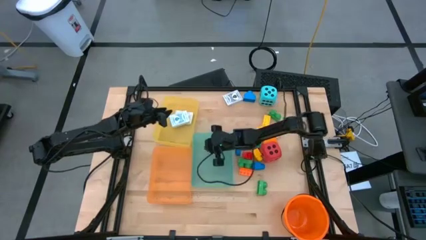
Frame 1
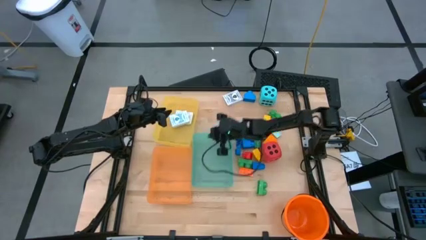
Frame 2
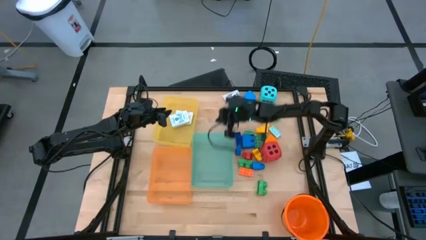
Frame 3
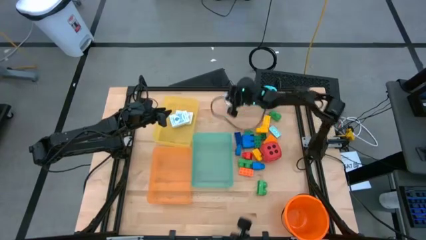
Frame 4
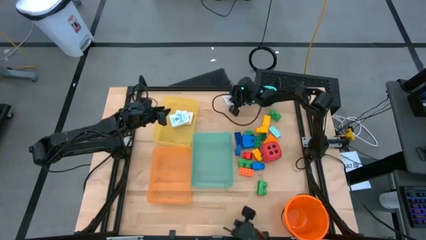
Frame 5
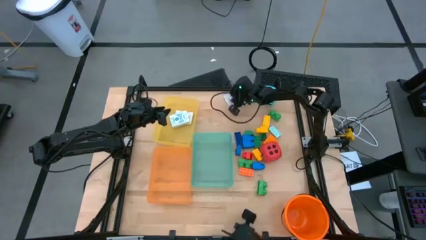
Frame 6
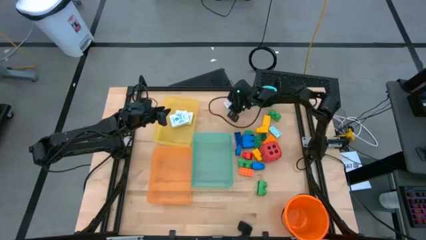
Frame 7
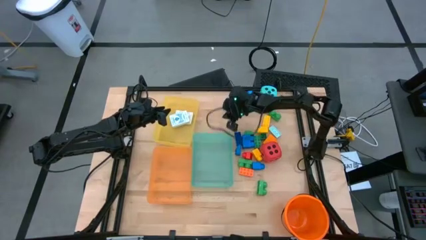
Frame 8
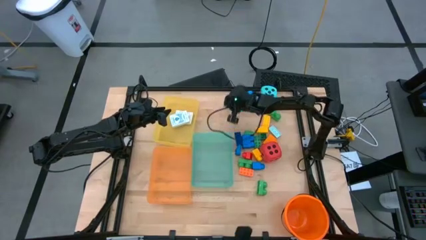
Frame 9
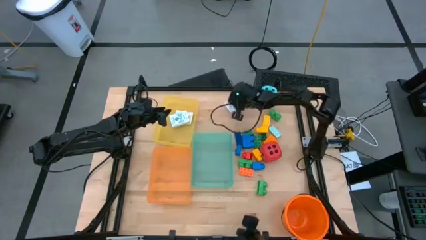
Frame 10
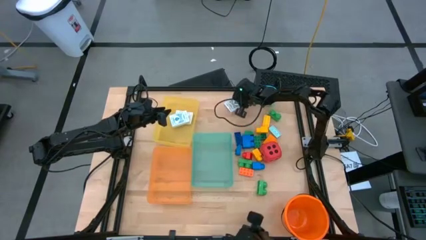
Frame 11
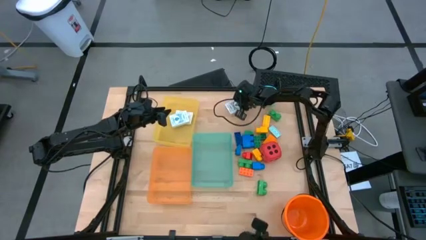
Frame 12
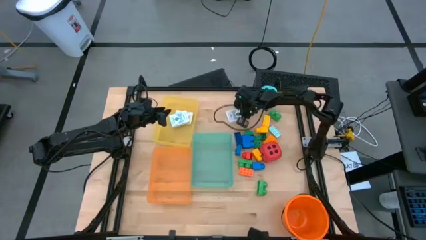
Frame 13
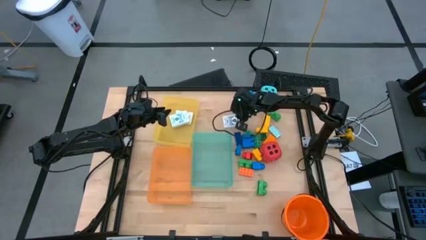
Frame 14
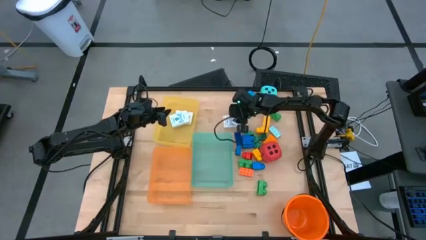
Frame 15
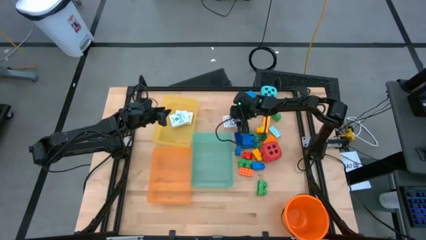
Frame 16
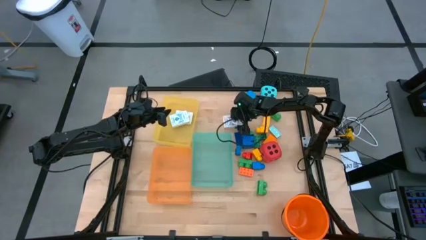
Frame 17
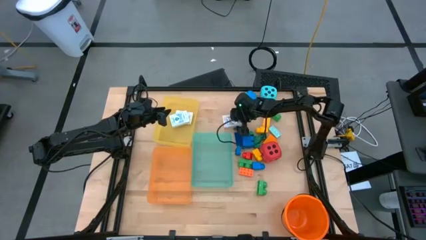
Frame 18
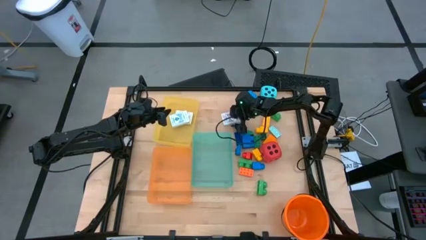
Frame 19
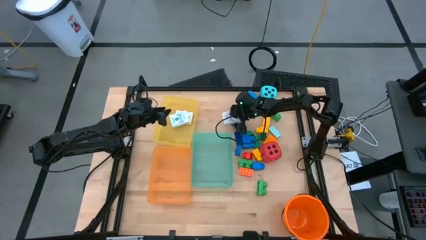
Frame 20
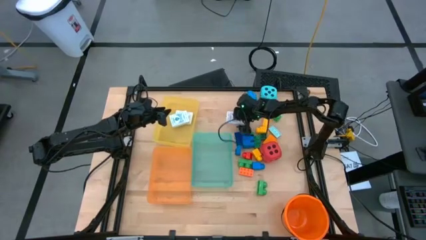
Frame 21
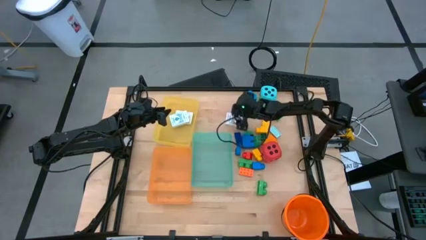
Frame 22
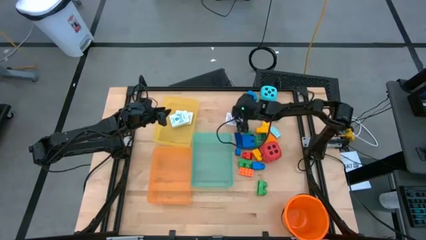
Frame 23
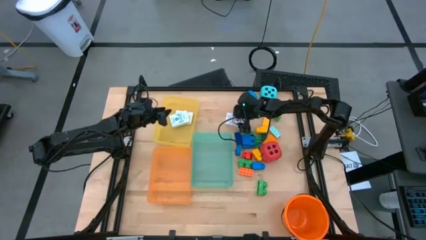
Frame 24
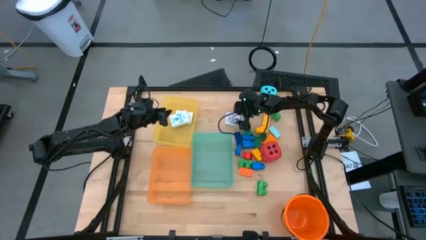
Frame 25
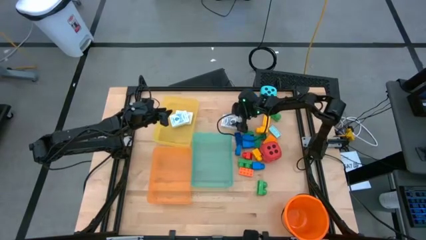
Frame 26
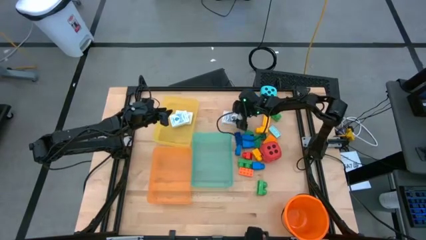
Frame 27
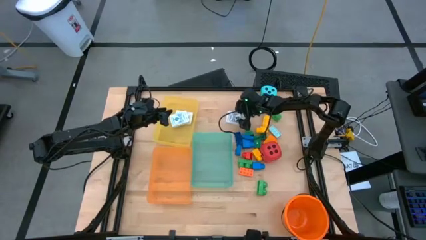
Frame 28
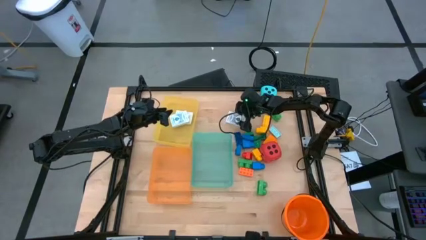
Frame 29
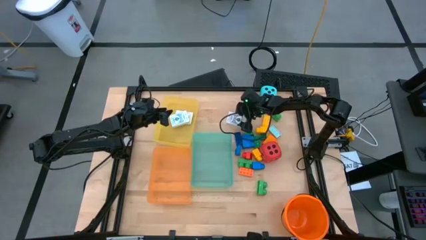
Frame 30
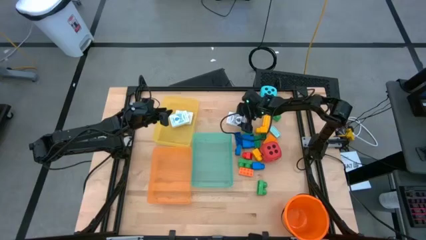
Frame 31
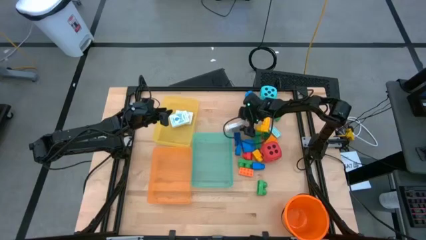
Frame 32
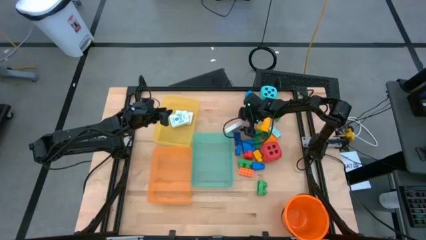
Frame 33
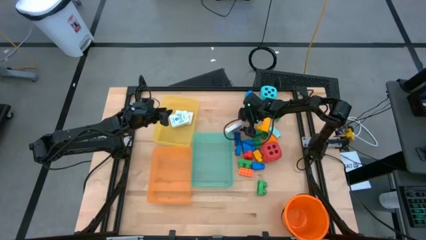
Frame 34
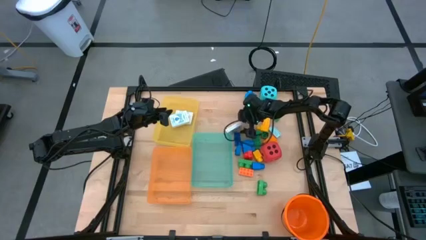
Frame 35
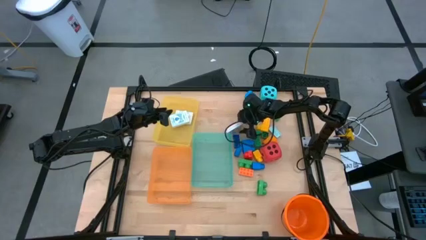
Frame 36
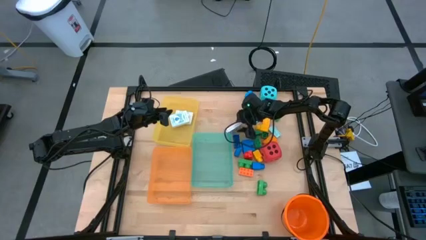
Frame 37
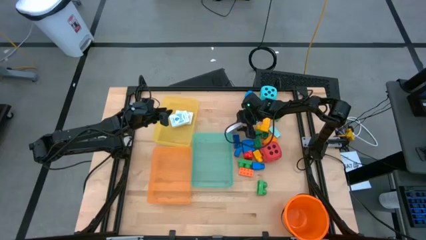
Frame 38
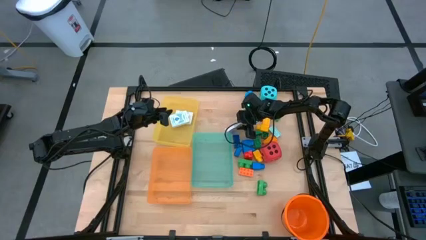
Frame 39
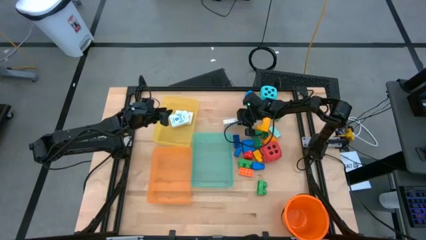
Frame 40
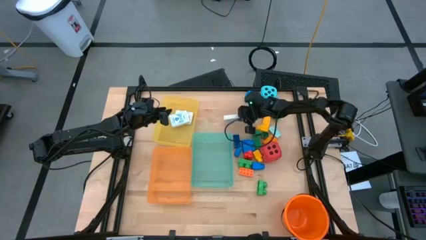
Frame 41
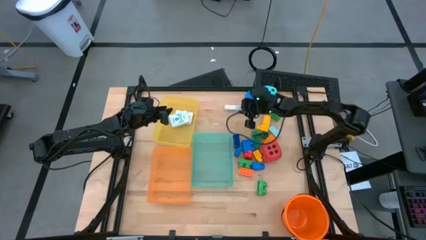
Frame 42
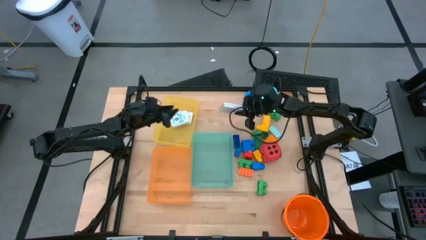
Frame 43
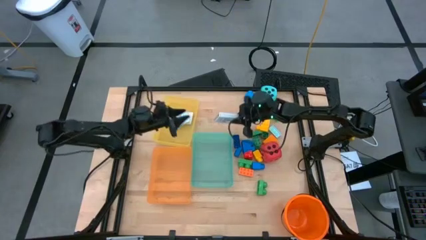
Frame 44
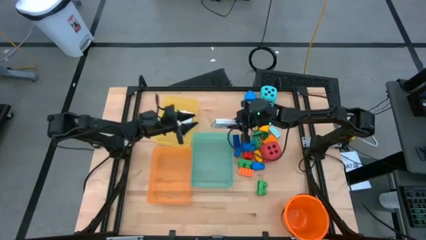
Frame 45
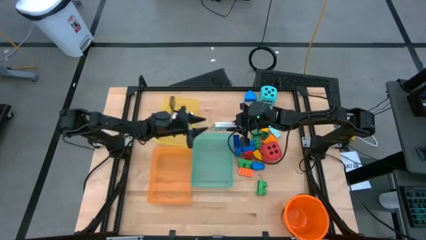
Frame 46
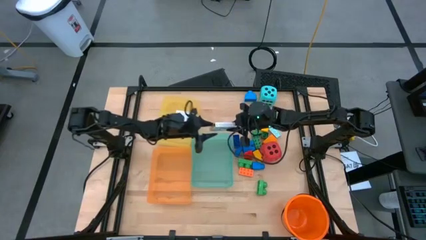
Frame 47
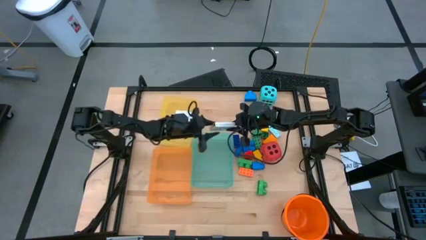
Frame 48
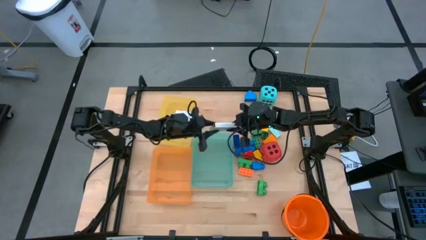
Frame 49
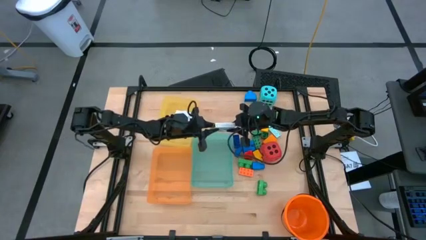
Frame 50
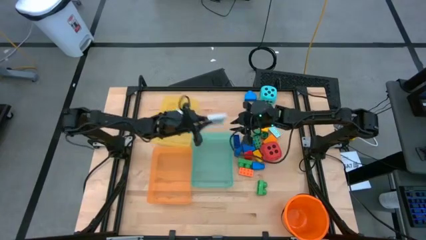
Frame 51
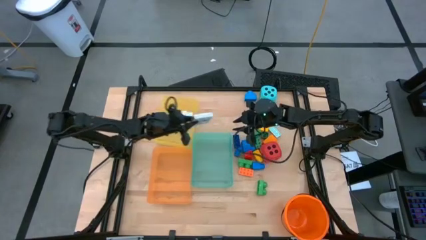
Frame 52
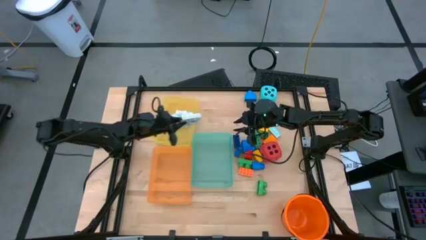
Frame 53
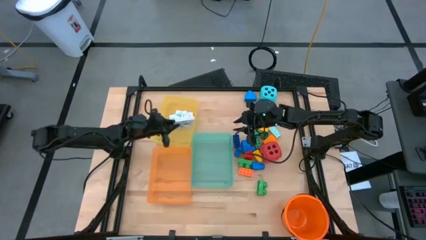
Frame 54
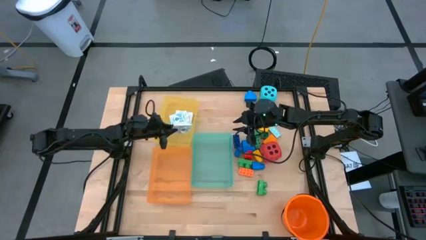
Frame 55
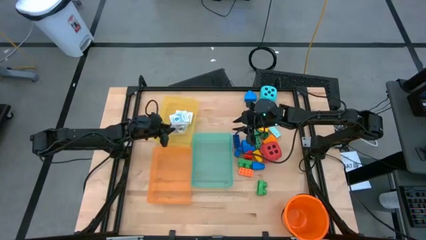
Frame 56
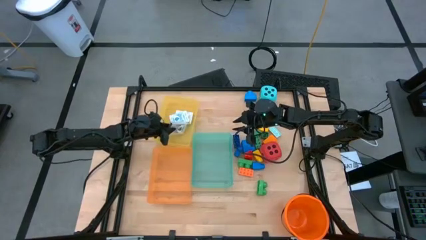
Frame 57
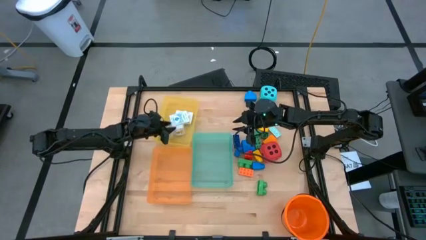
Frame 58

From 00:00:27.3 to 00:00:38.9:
Task: Pick & Place Toys
Put the black deck of cards into the yellow bin

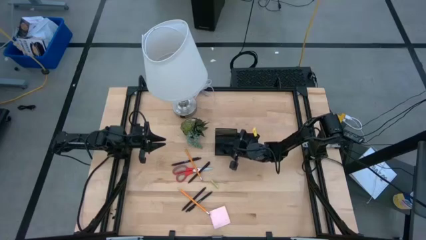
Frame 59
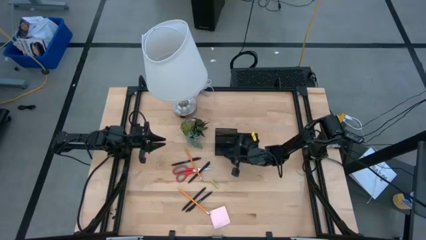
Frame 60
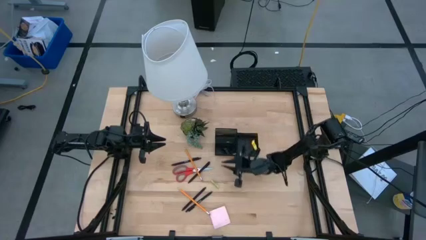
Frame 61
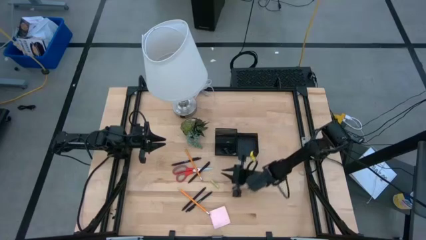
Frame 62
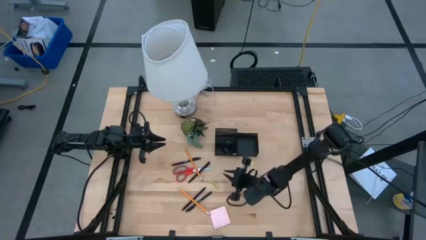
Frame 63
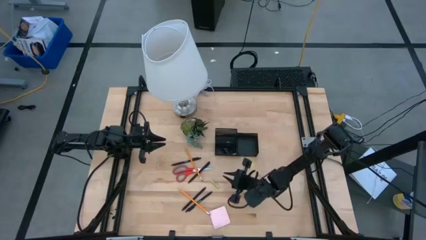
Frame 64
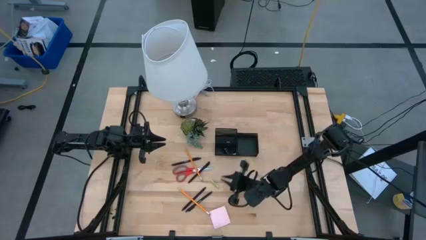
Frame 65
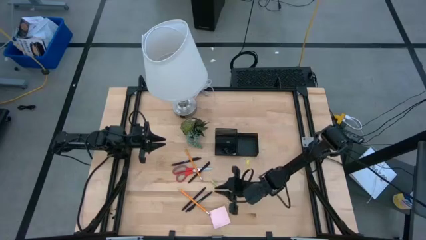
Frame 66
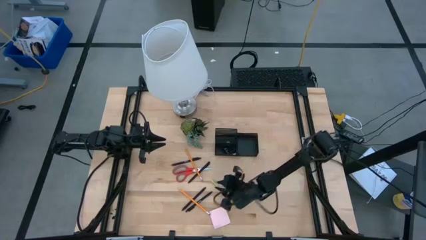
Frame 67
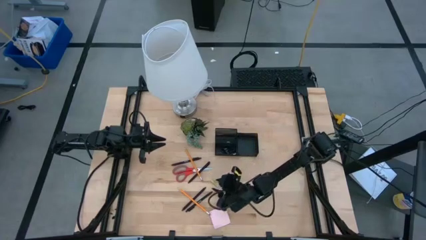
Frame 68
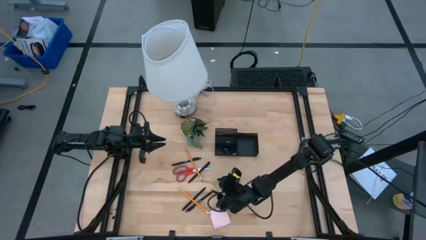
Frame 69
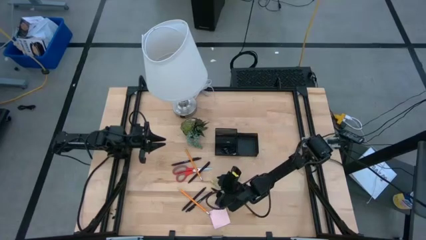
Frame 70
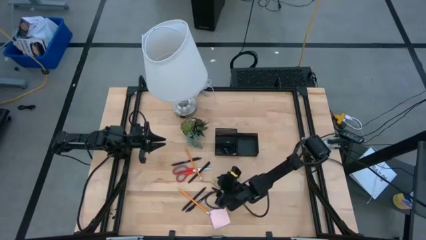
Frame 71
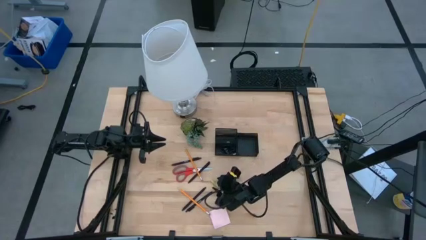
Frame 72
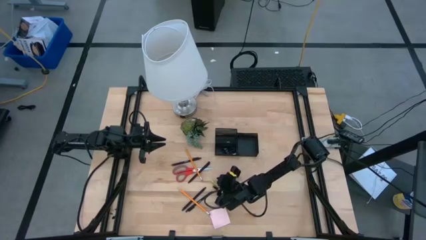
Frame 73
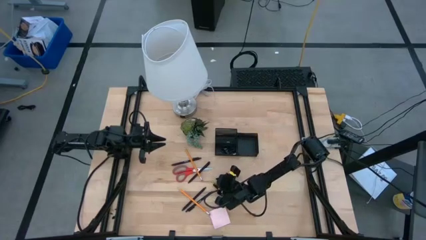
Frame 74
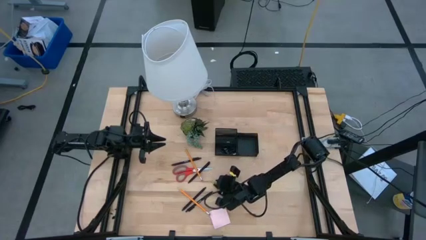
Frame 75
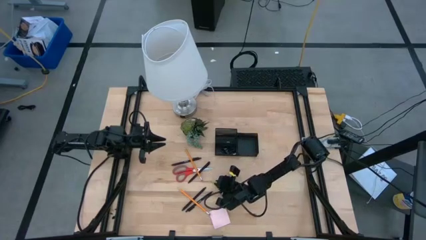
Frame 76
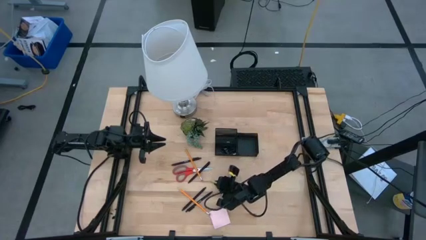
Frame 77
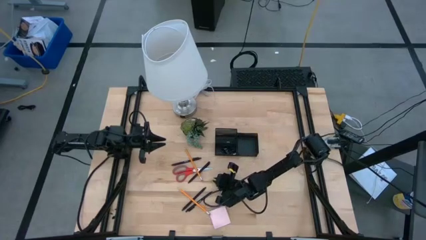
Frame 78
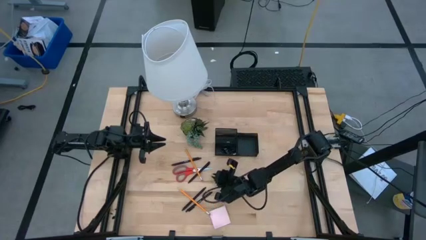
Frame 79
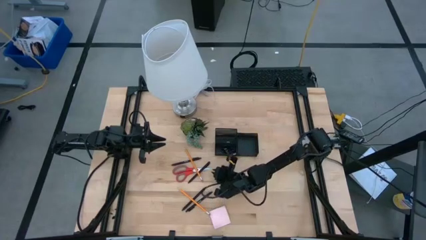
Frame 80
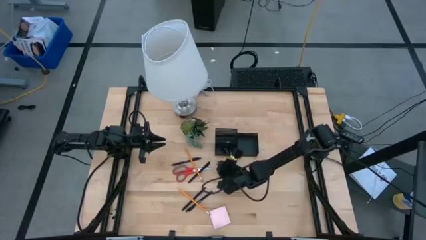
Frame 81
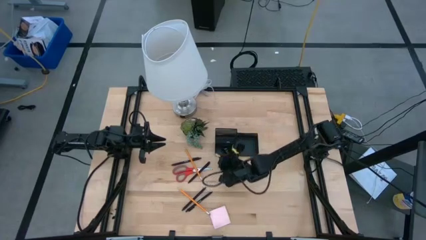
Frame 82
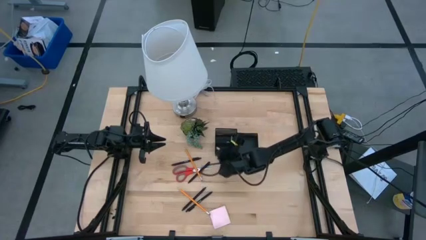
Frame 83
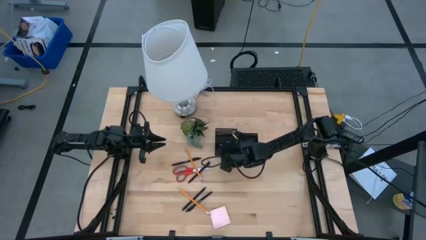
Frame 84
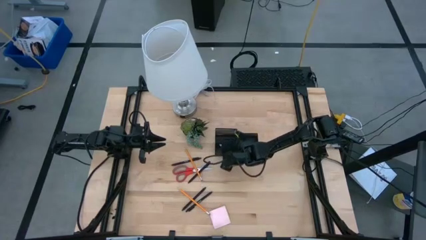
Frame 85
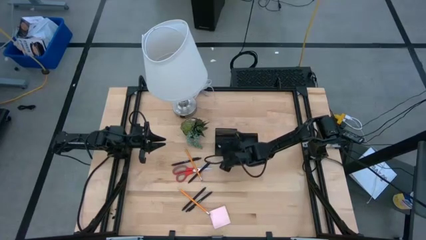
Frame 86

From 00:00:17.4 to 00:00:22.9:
Task: Pick and place office supplies into organizer
Put the green eraser into the desk organizer
